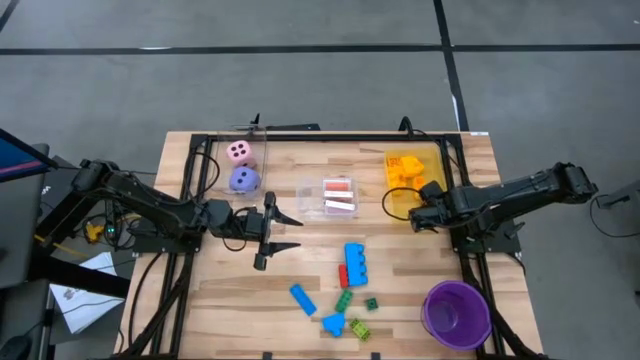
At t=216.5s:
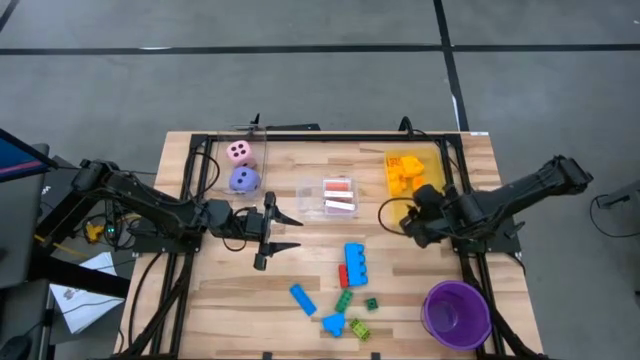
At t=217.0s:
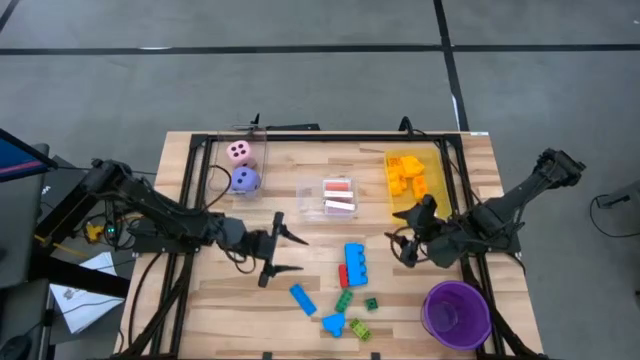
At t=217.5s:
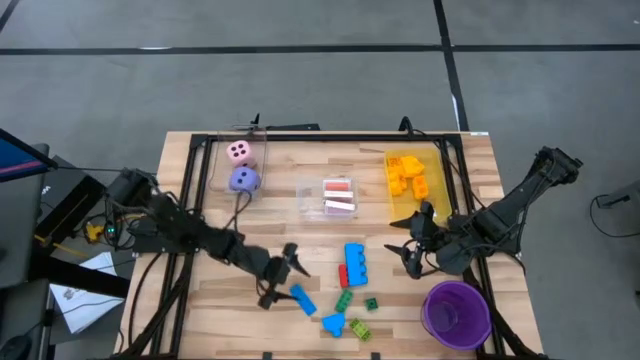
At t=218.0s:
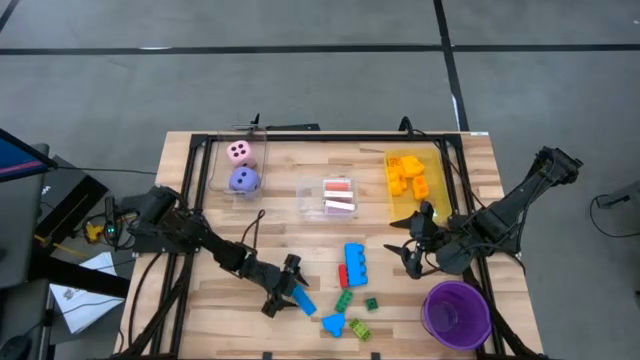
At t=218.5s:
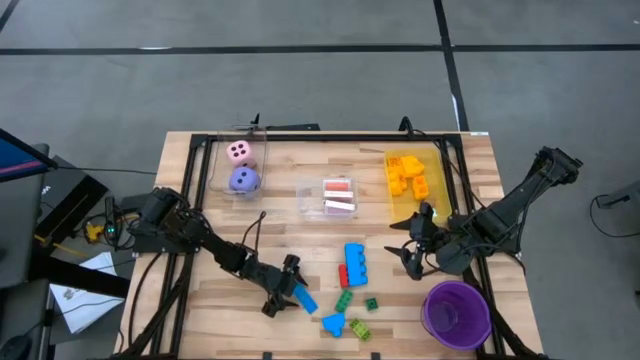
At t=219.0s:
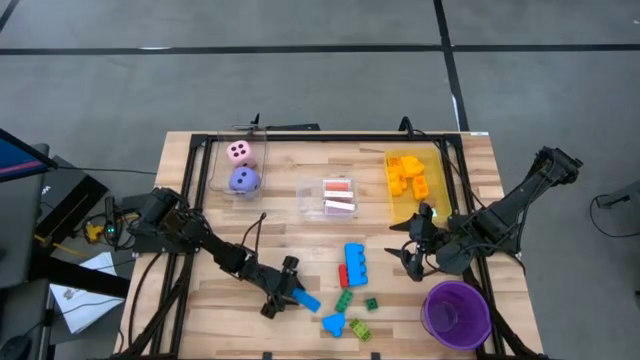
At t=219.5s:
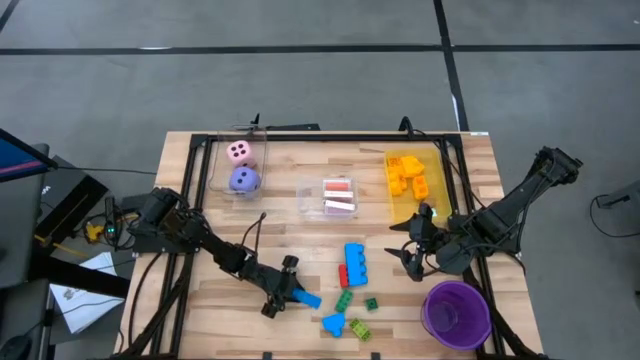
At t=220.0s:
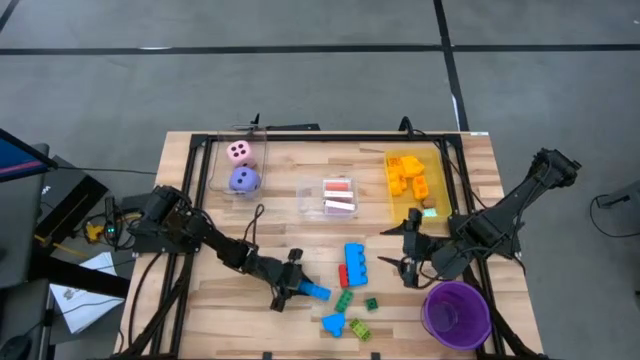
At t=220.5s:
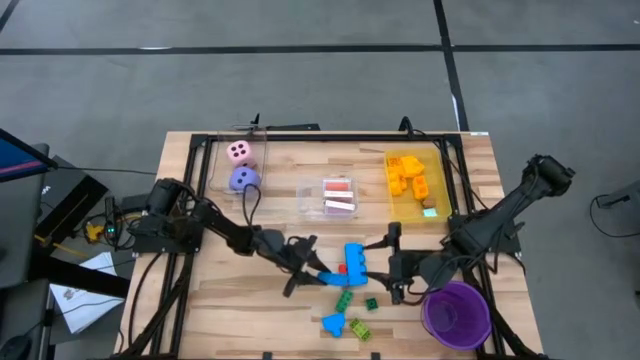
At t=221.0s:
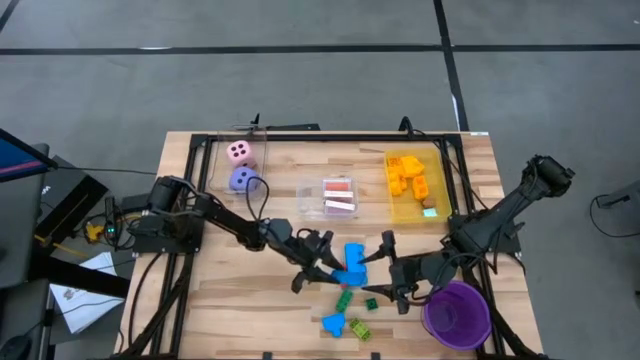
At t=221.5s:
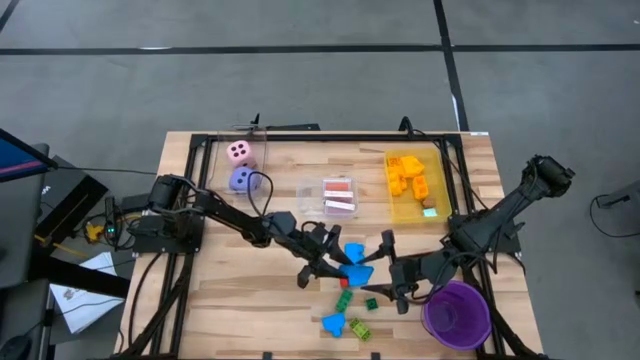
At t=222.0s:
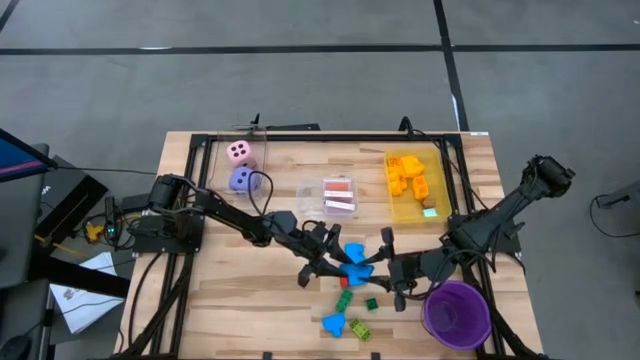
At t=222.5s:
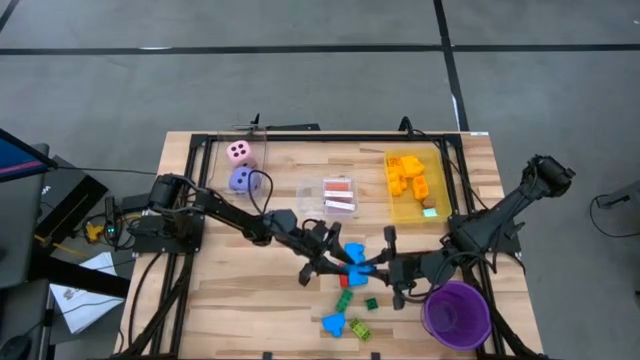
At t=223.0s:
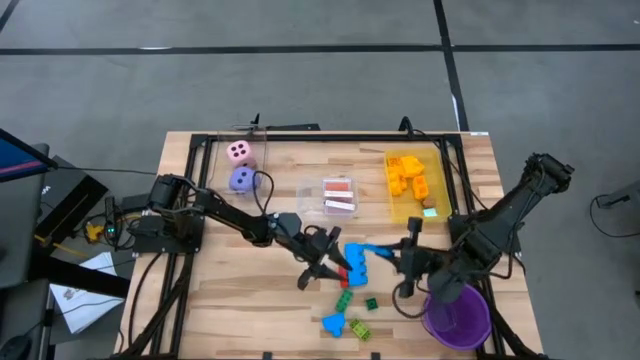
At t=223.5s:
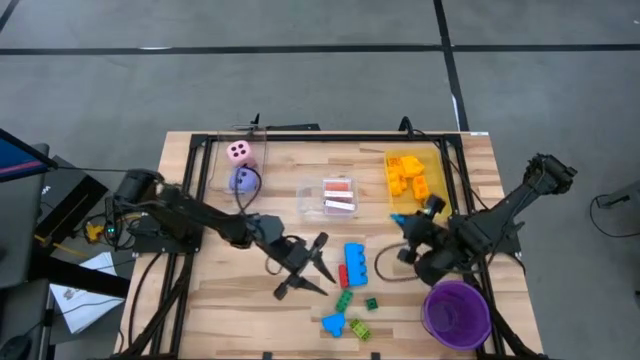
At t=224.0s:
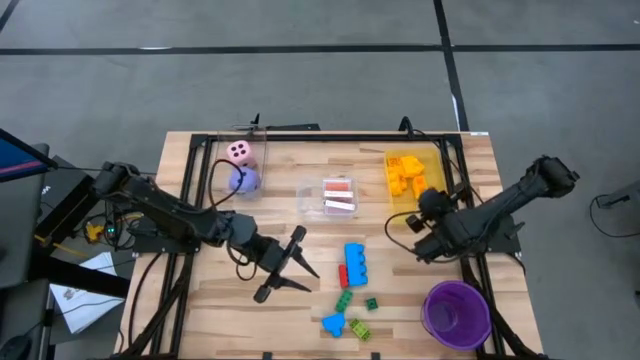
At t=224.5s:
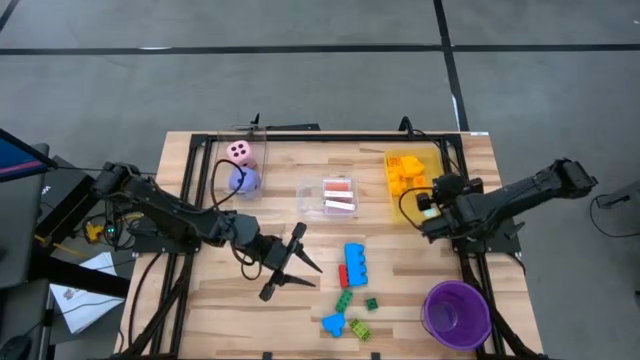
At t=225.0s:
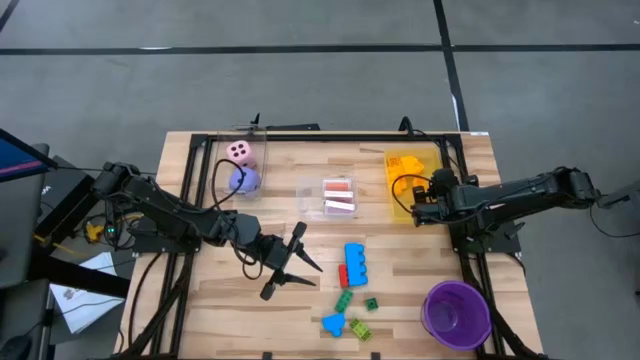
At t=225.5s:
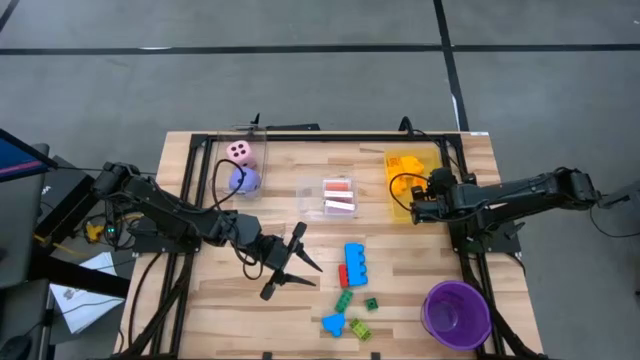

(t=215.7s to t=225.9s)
Task: Pick & Place Toys
Put the blue game piece into the yellow bin

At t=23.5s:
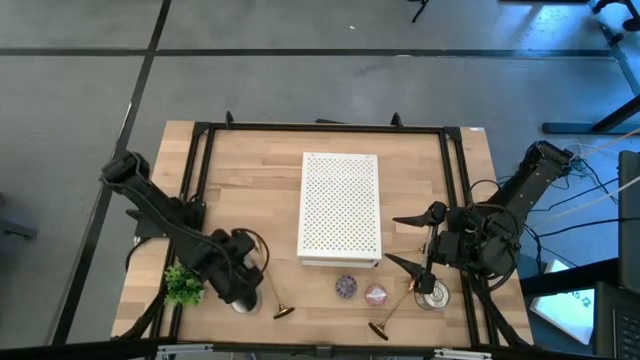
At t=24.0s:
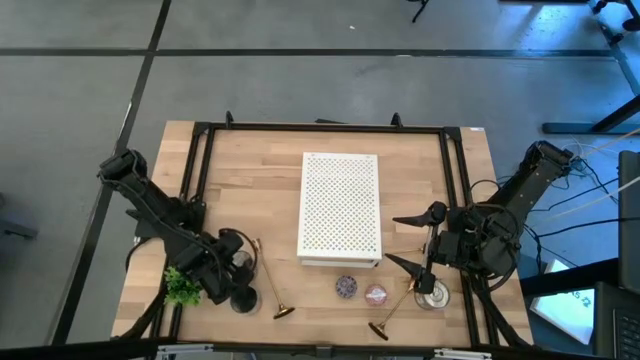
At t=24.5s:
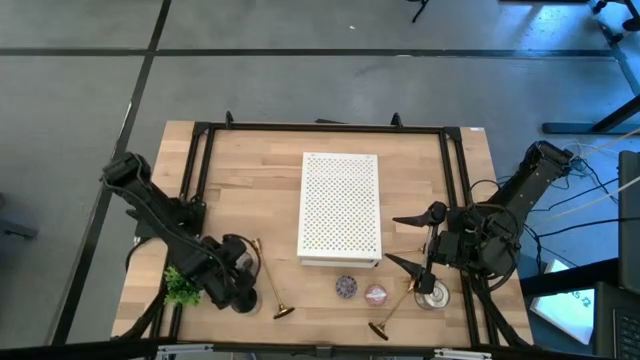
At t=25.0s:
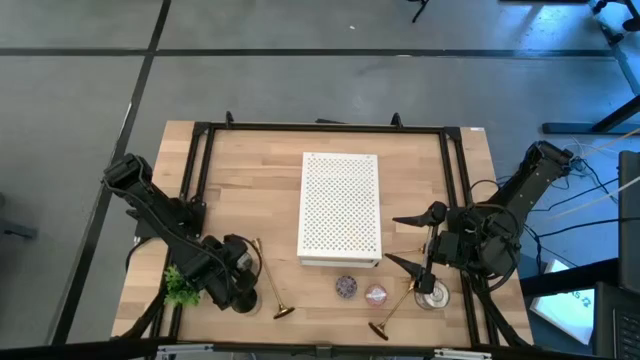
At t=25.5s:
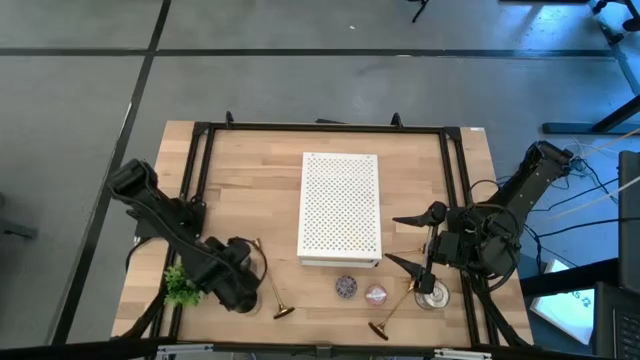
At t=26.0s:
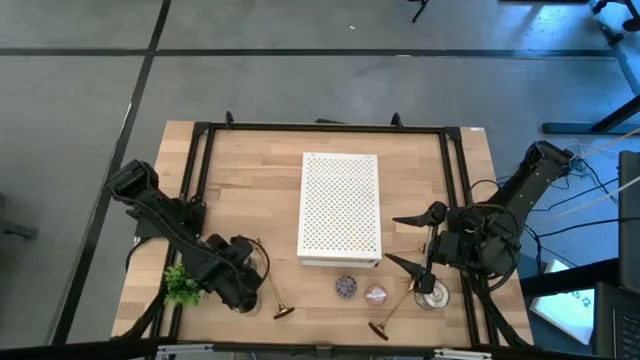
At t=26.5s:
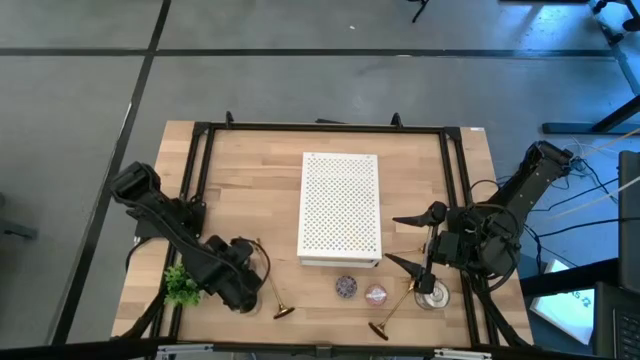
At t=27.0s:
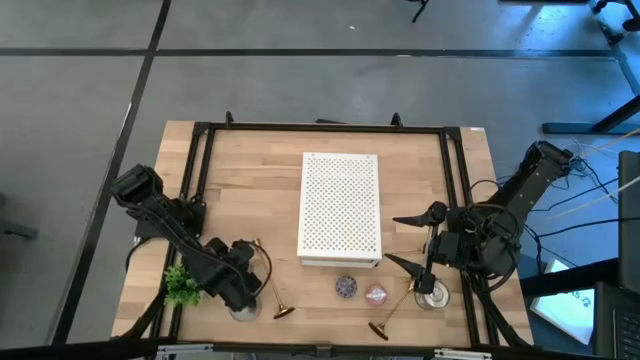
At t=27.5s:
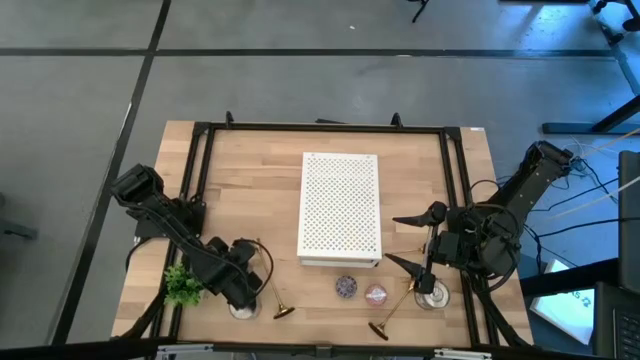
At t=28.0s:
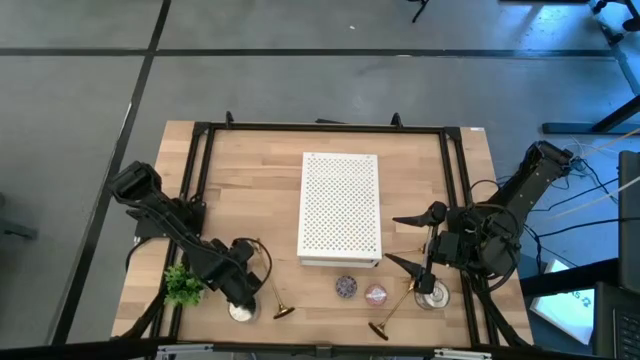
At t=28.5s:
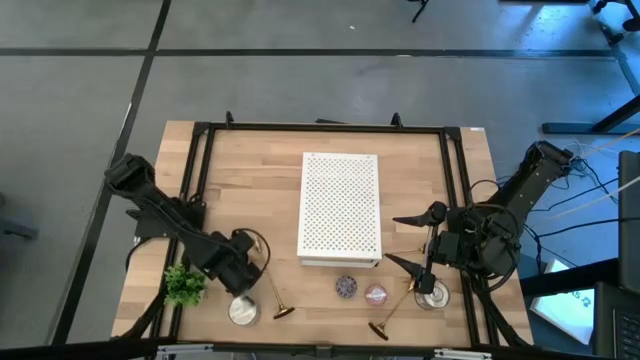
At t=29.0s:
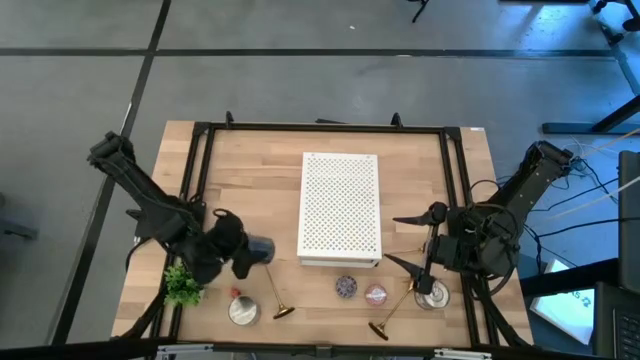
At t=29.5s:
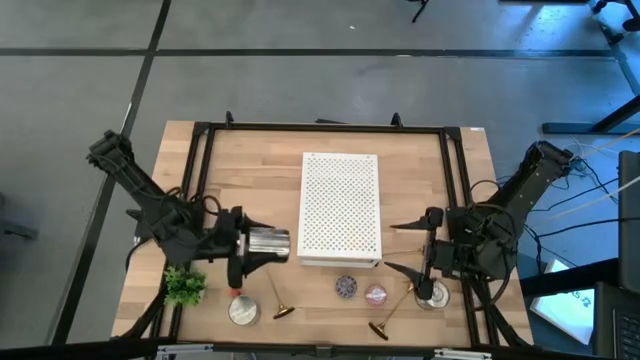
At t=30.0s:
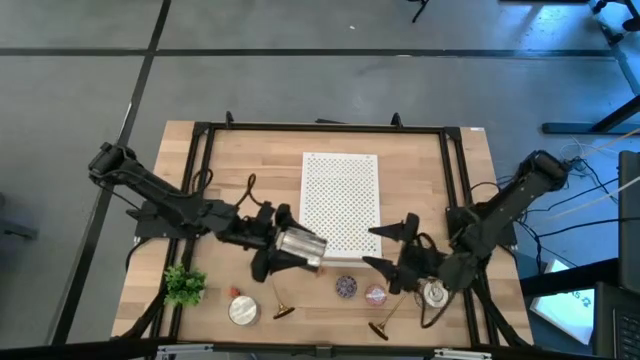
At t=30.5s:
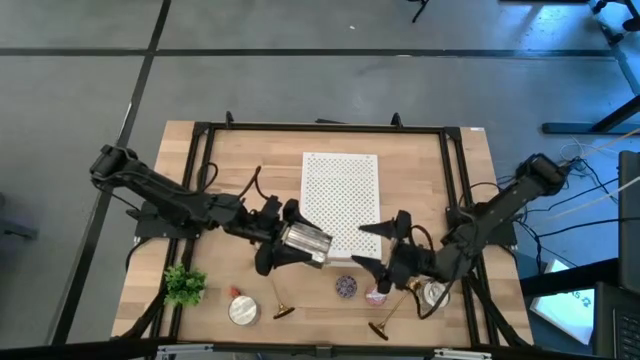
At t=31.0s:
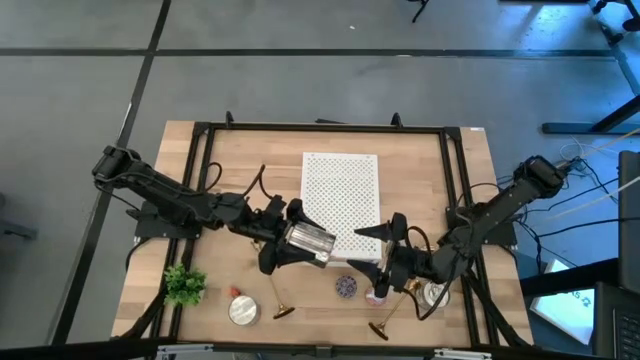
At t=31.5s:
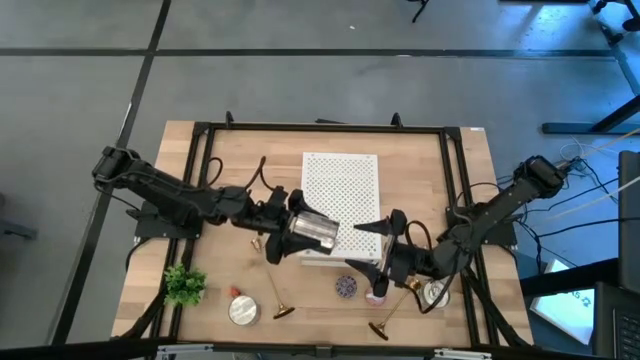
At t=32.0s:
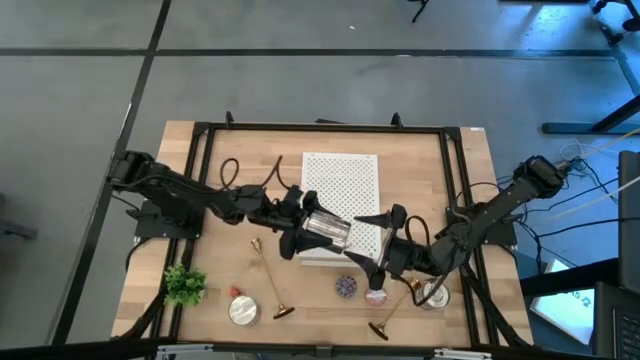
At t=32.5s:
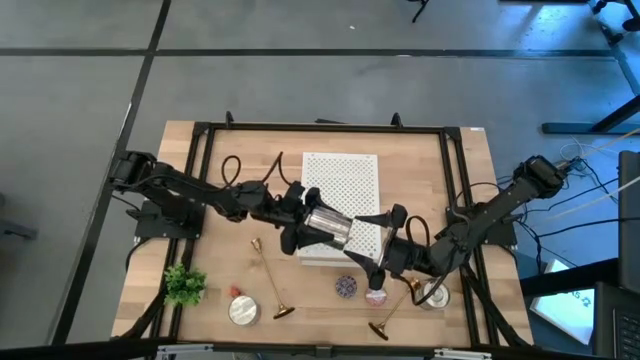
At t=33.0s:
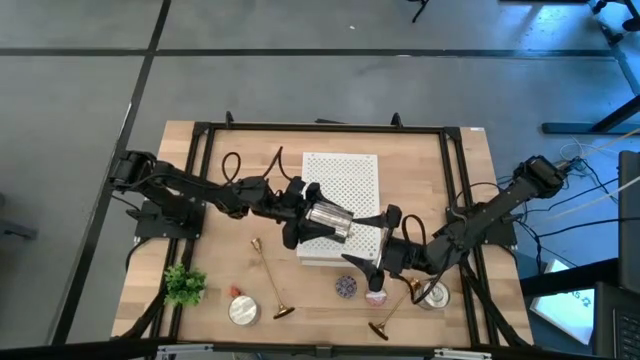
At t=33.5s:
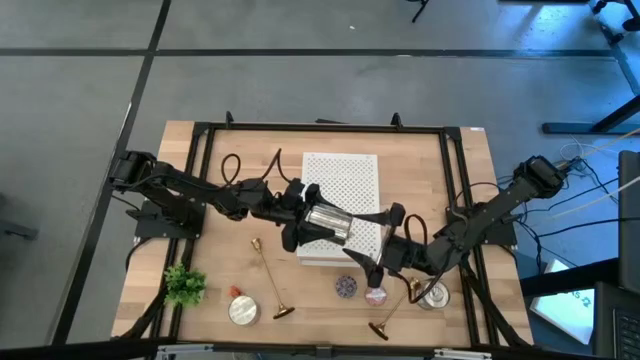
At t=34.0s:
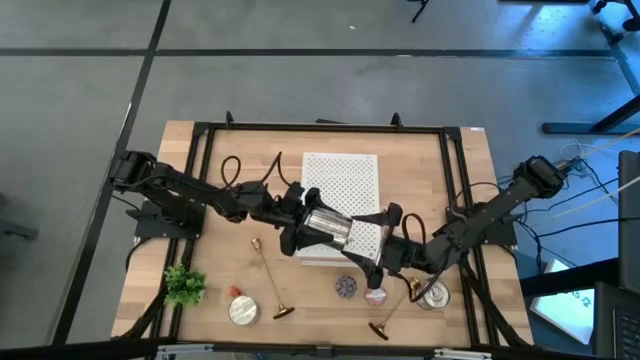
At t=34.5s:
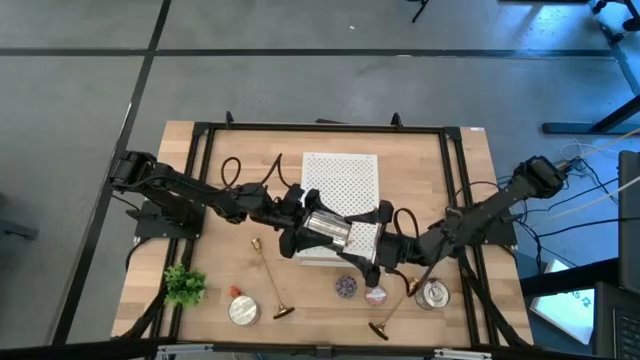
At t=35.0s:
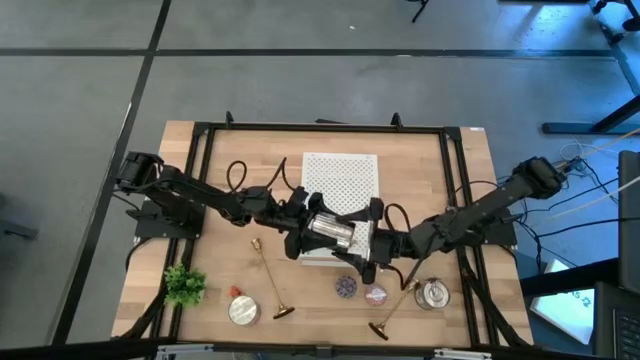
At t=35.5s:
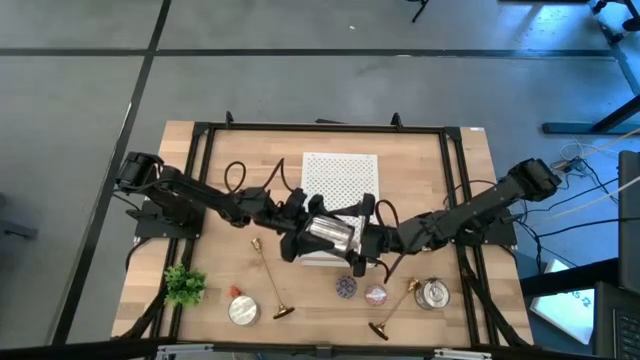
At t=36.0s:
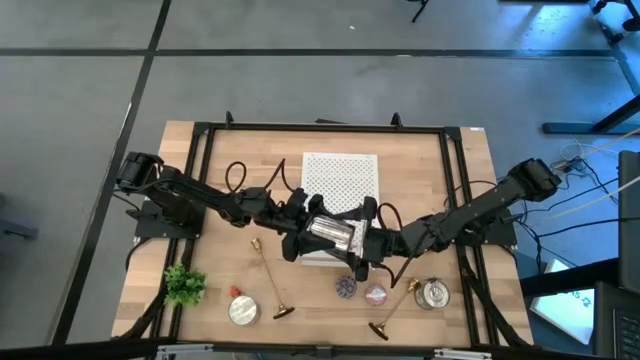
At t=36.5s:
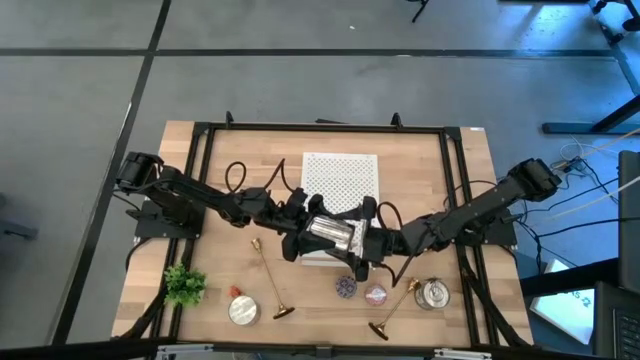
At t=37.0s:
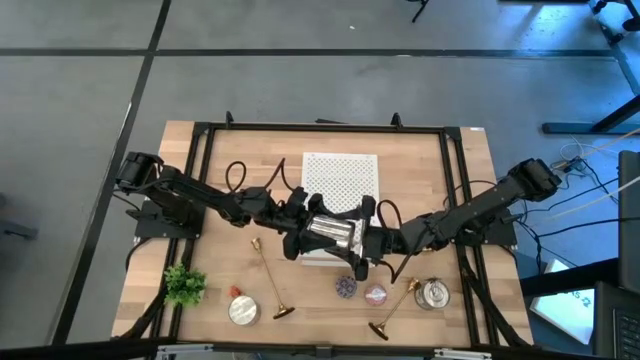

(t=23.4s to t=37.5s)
Task: Pick & Place candle stick holders
Put the top silver scented candle on the shelf
